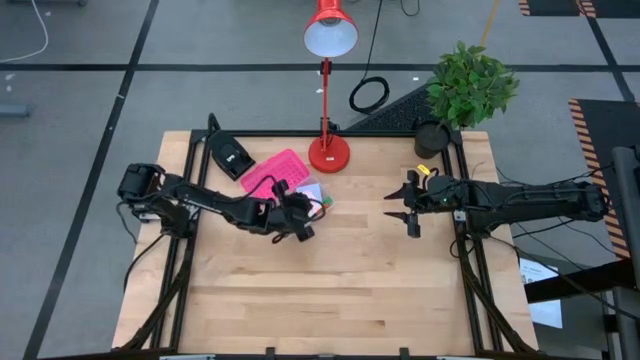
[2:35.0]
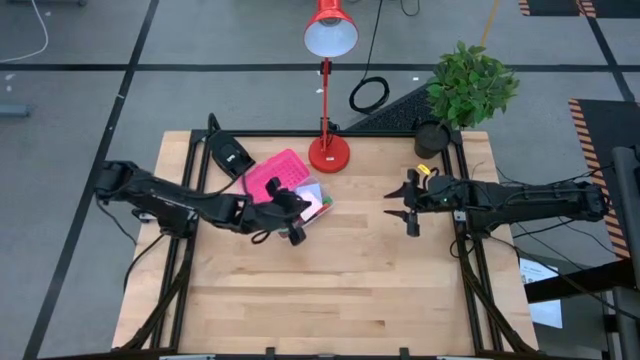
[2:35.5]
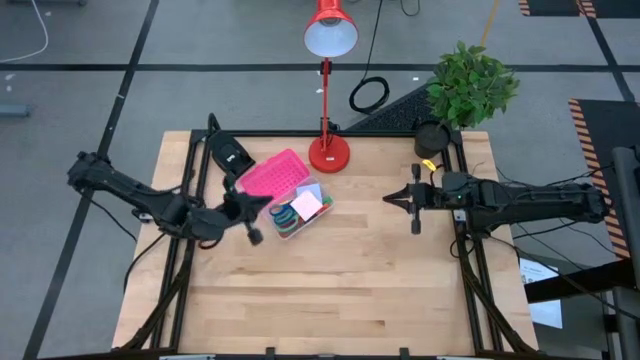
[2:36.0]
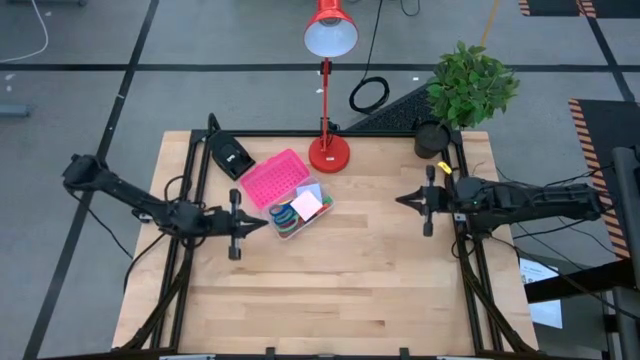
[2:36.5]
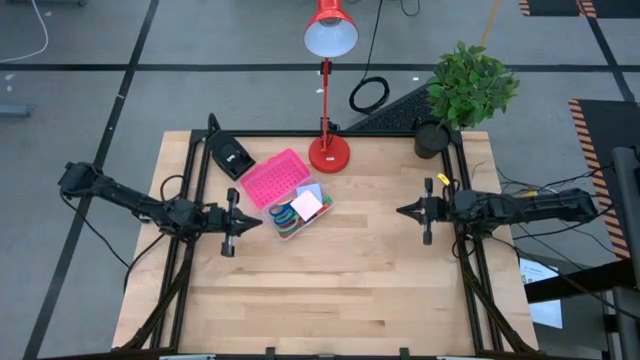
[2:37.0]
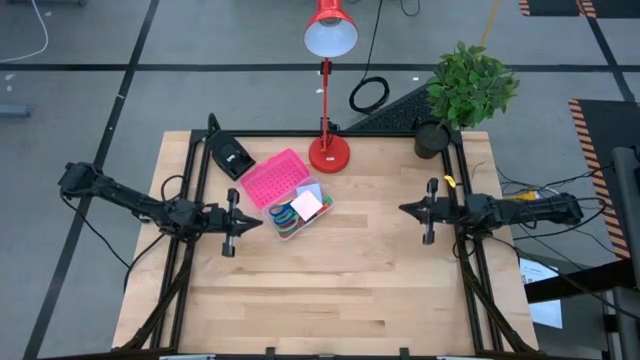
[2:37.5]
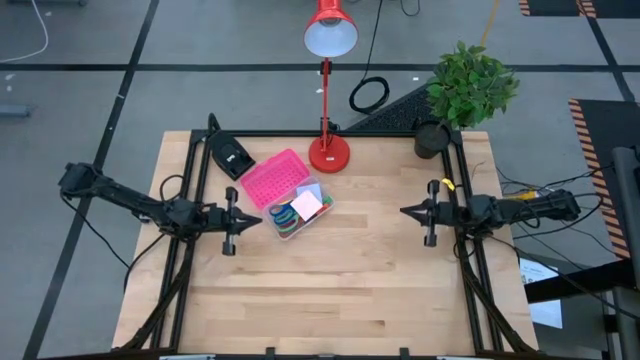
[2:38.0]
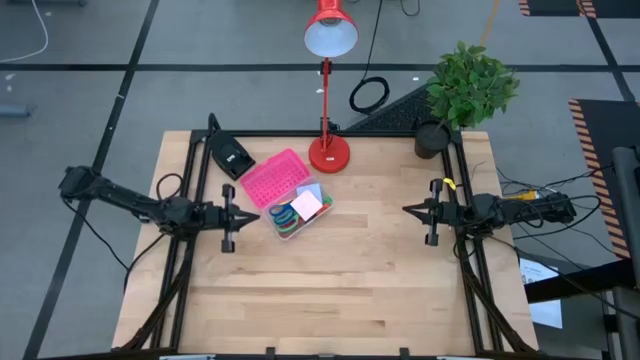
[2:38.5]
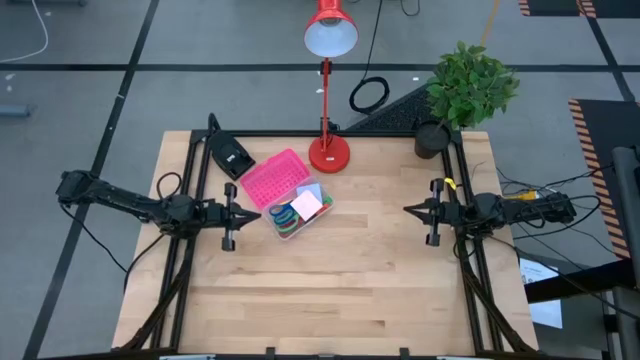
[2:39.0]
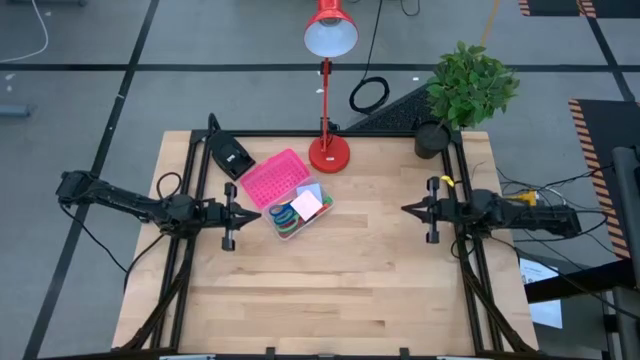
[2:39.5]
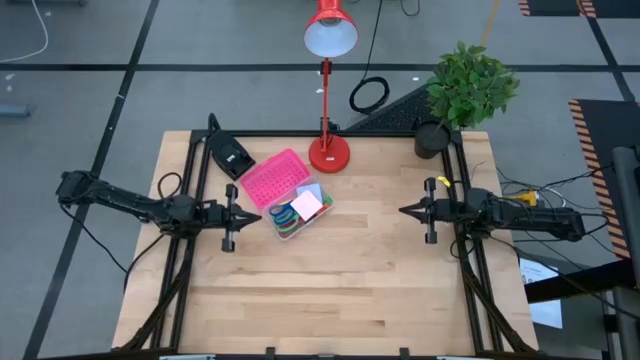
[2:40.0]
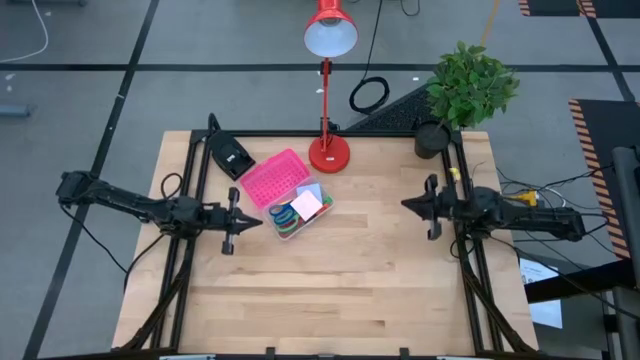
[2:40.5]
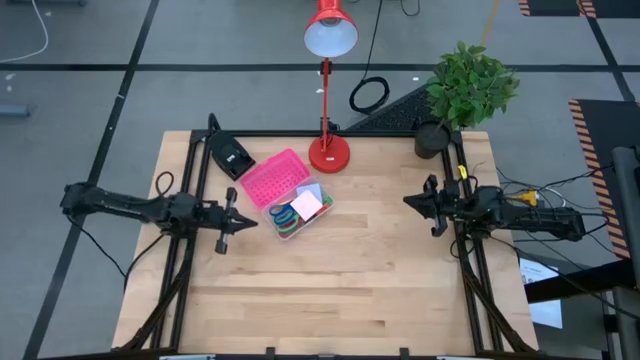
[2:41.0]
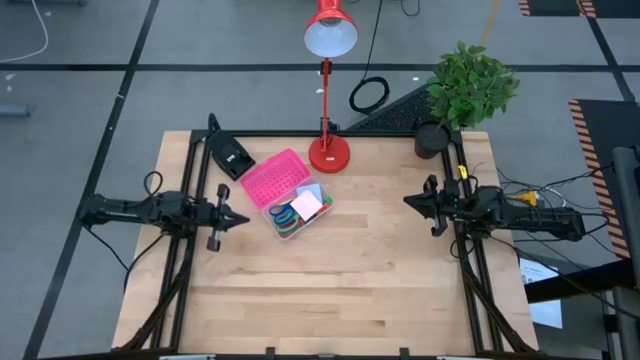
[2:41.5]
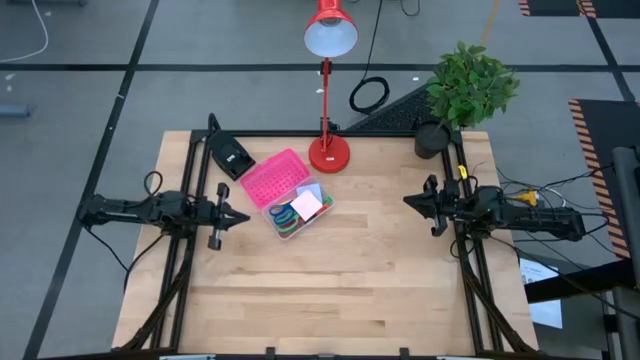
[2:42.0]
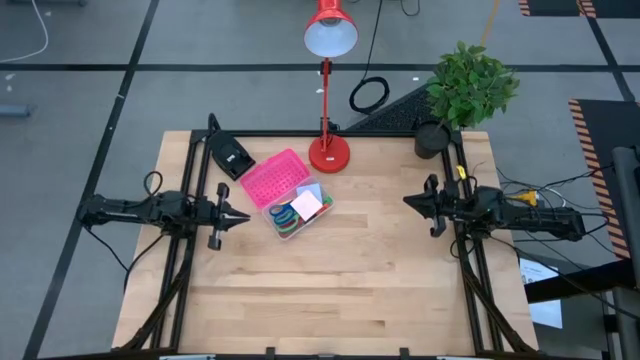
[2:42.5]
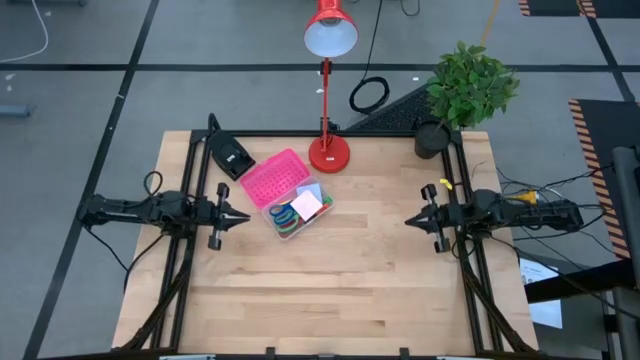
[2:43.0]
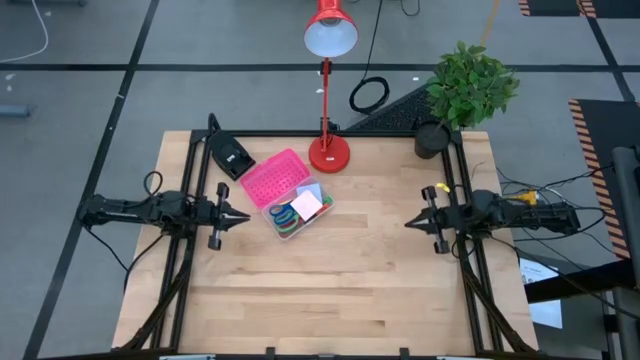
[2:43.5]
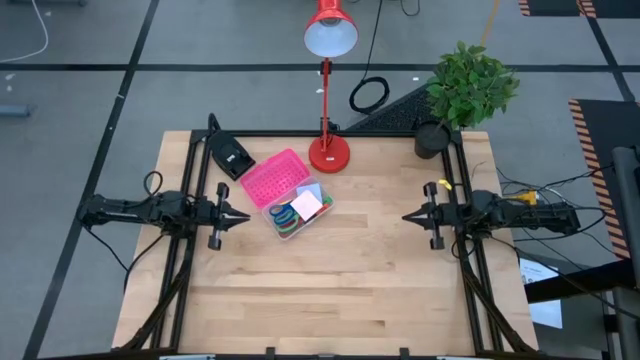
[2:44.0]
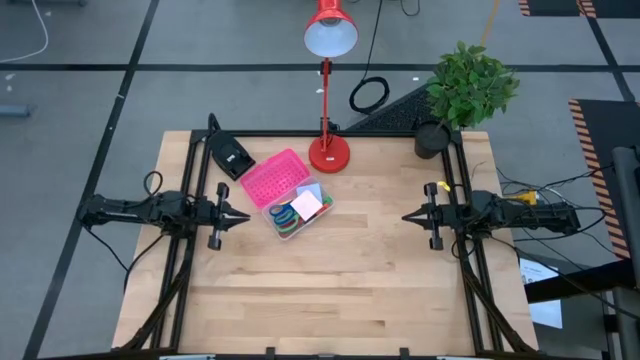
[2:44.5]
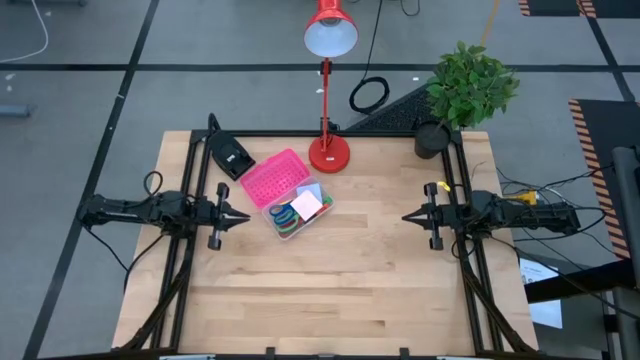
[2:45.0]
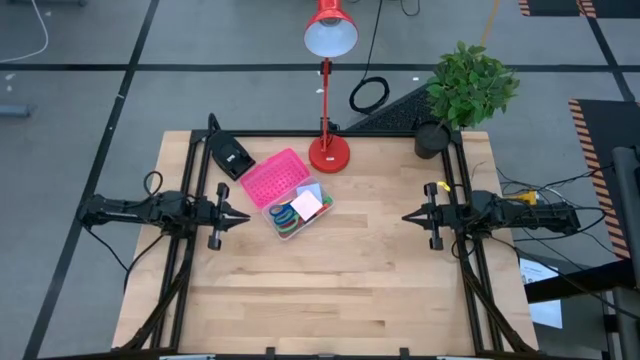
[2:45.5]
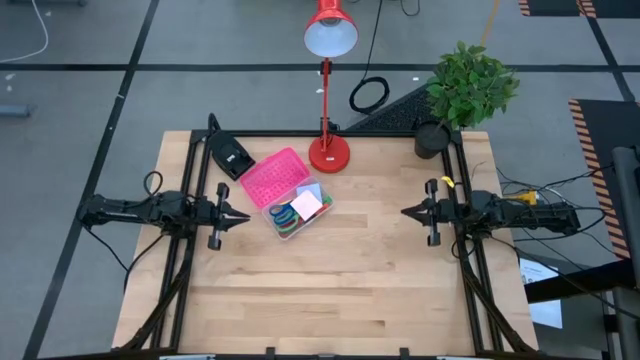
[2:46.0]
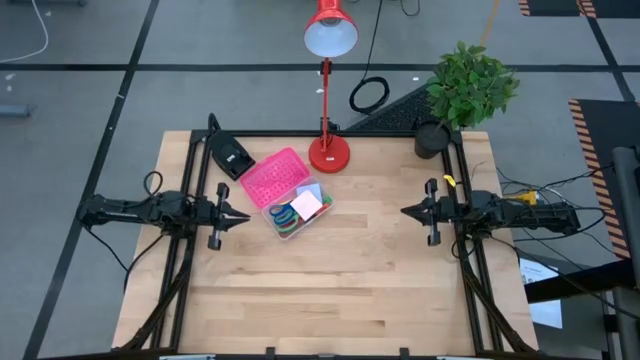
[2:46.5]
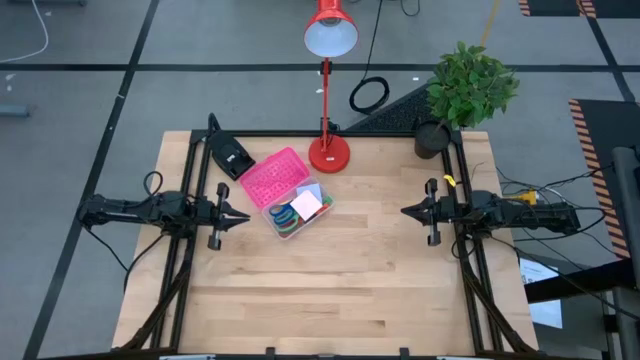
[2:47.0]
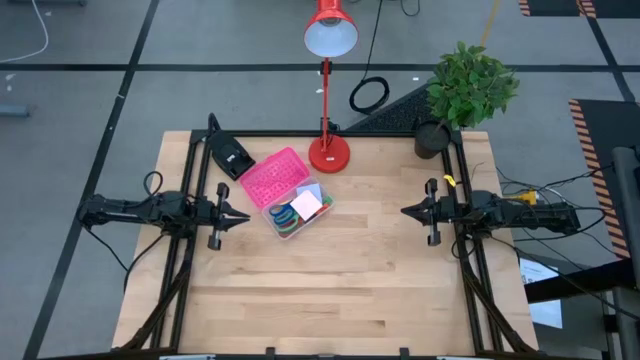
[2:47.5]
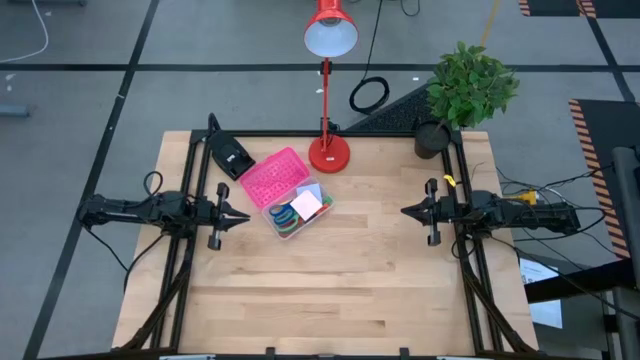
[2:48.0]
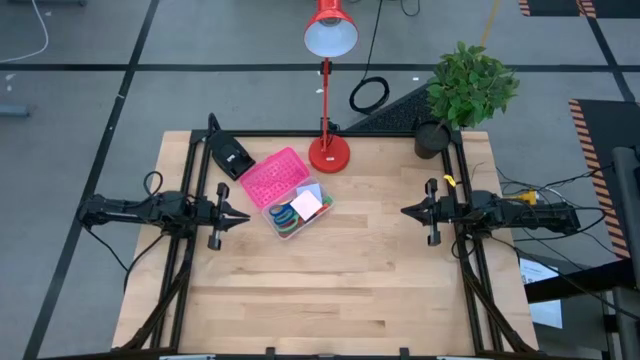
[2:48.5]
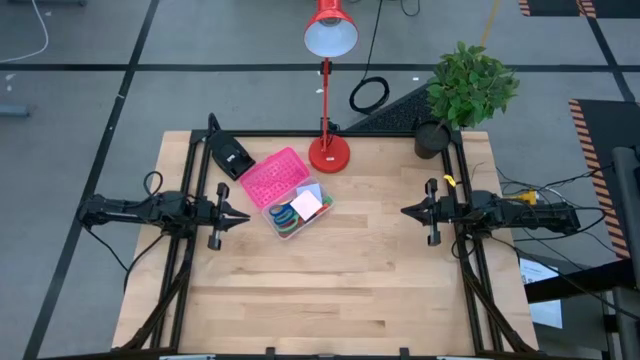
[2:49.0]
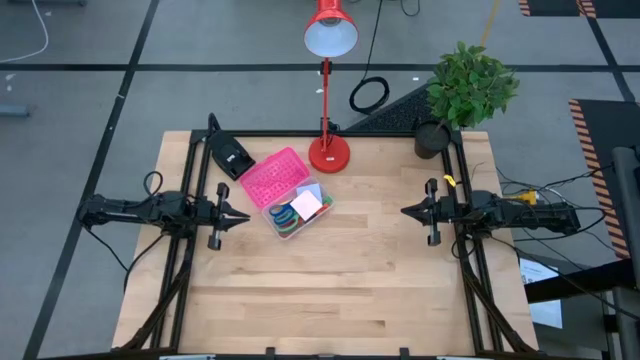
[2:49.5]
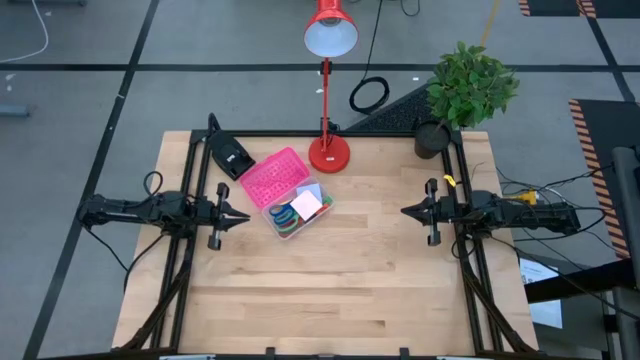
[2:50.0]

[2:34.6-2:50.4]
Task: Pack school essentials
Return to Home Position

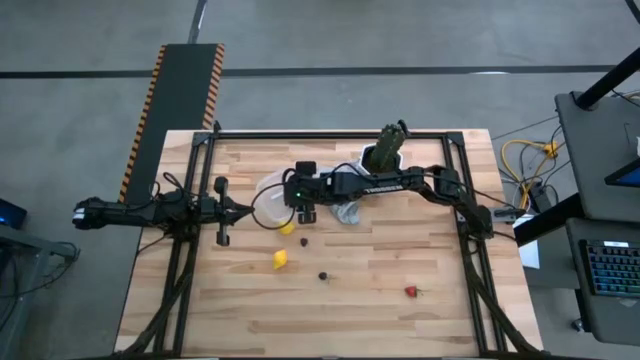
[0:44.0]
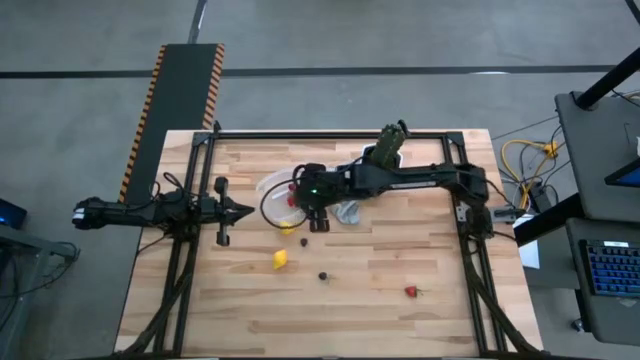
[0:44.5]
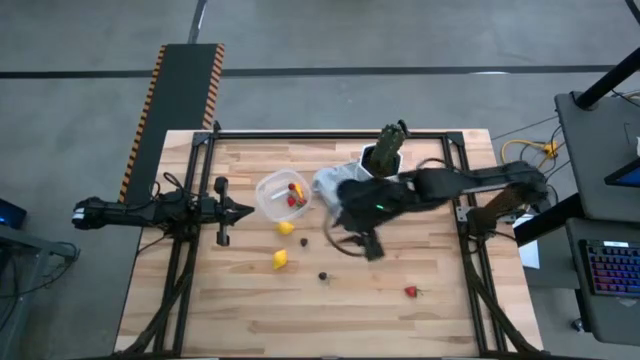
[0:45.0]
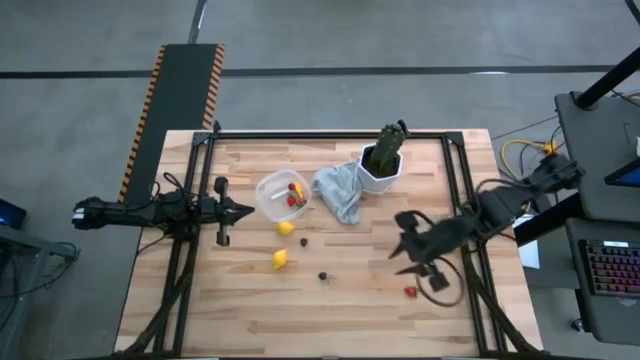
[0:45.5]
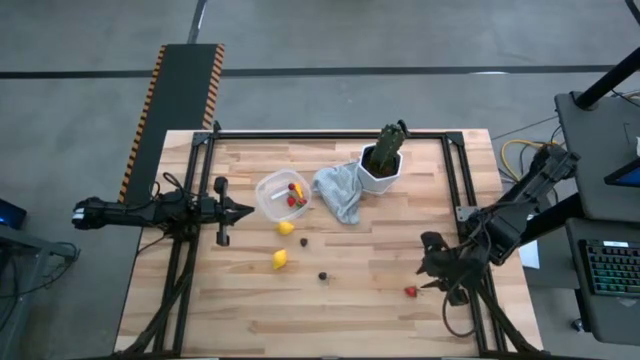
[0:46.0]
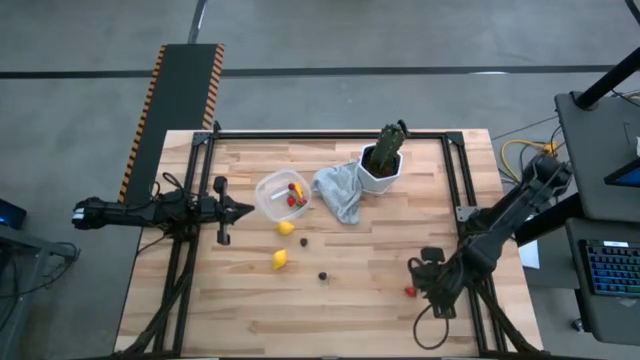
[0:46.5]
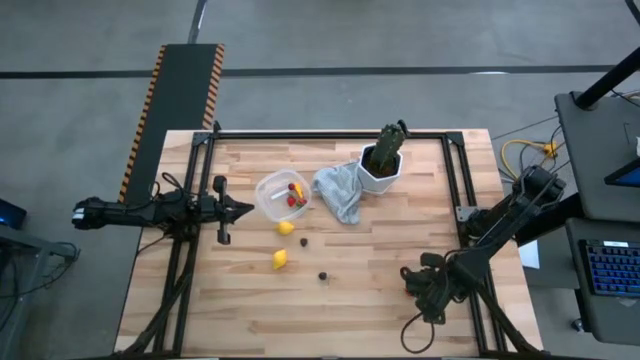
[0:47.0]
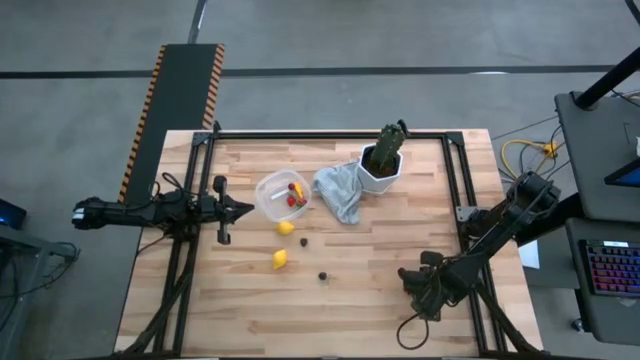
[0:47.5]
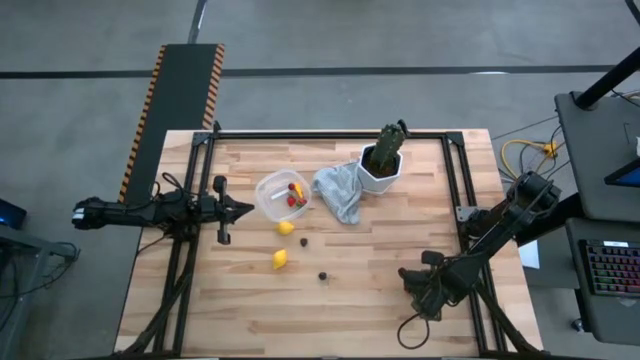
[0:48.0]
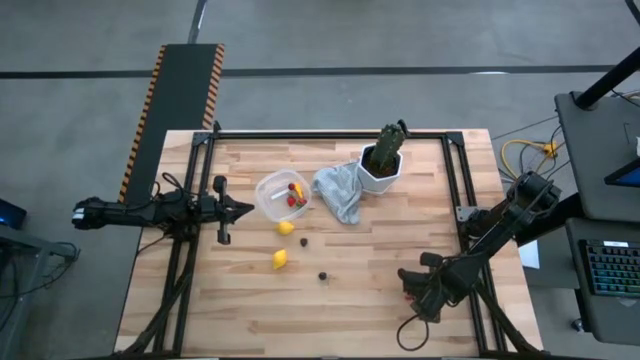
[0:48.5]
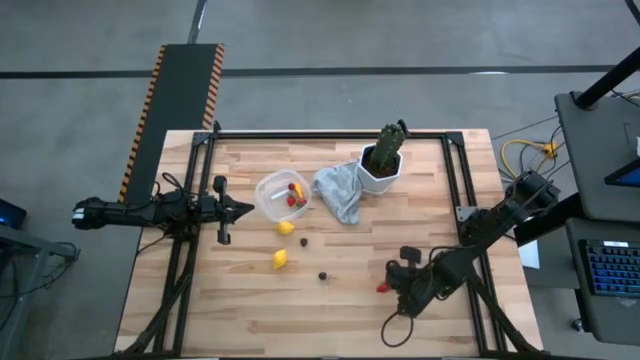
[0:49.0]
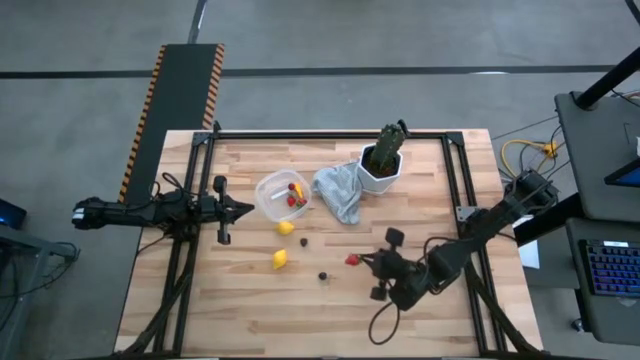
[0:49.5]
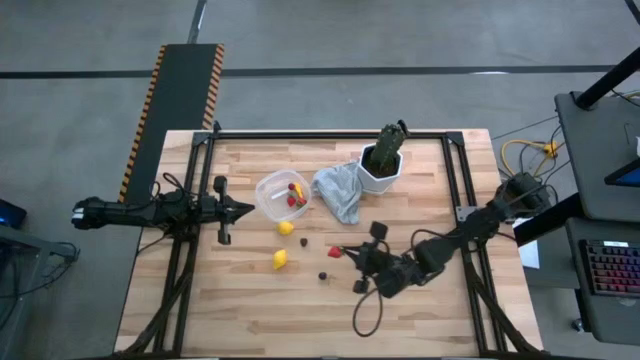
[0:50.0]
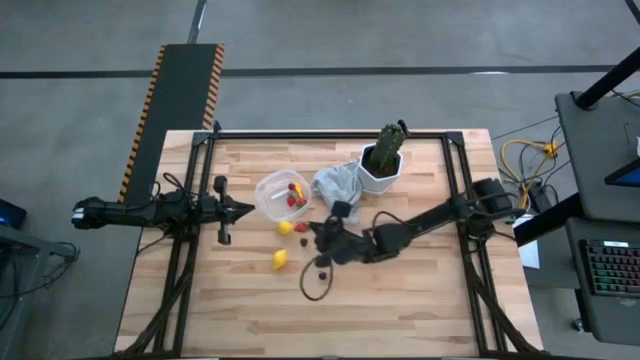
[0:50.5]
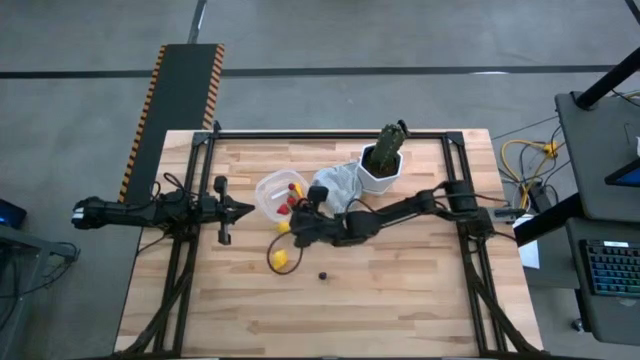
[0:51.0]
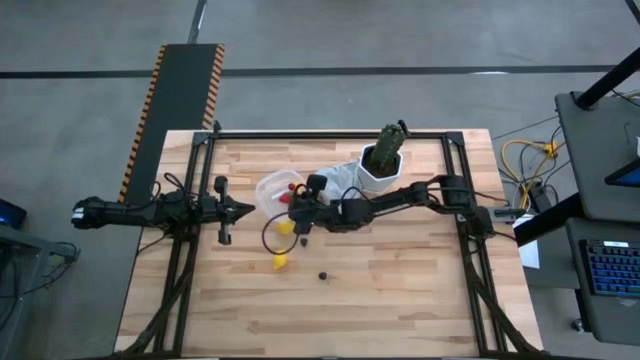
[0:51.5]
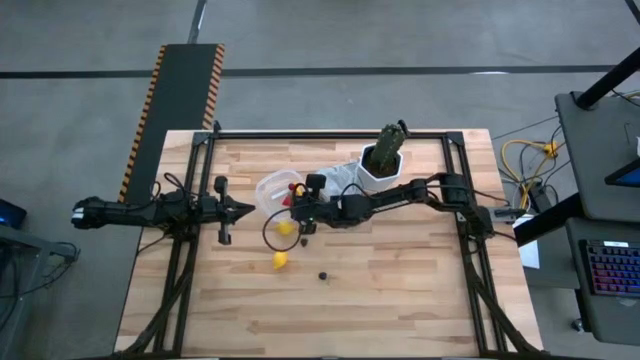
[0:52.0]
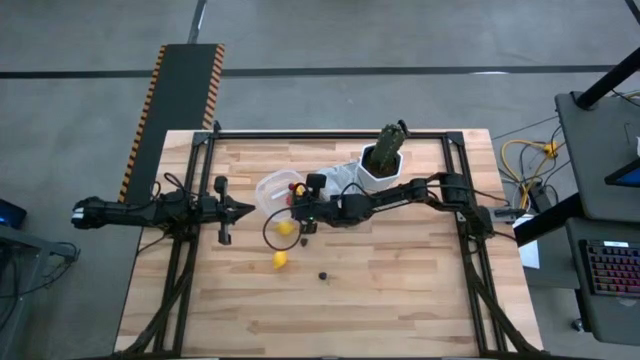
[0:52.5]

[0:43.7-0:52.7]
Task: Pick and placing Produce into tupperware
Put the red strawberry into the transparent container
